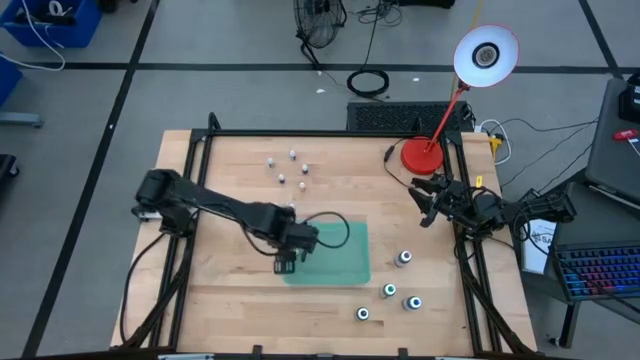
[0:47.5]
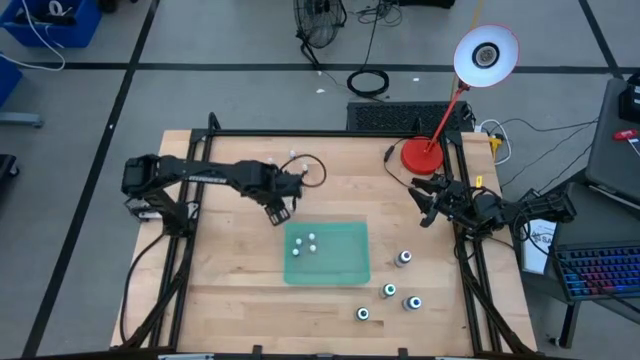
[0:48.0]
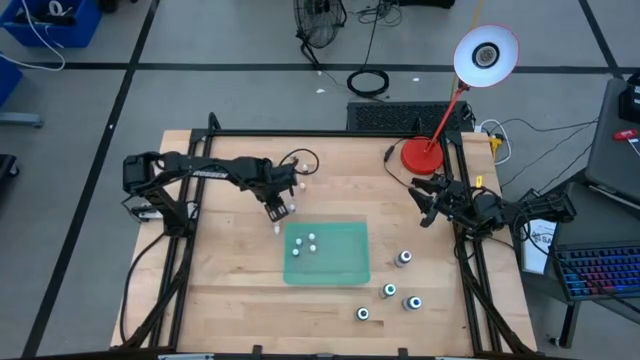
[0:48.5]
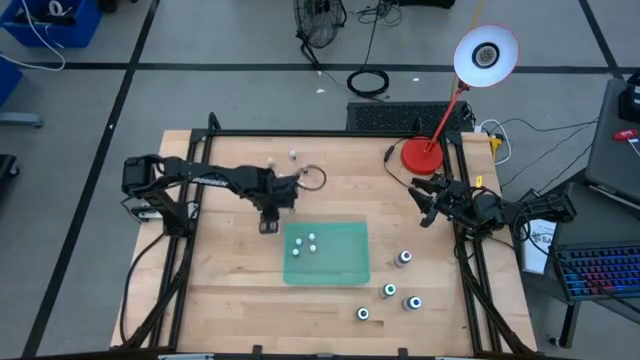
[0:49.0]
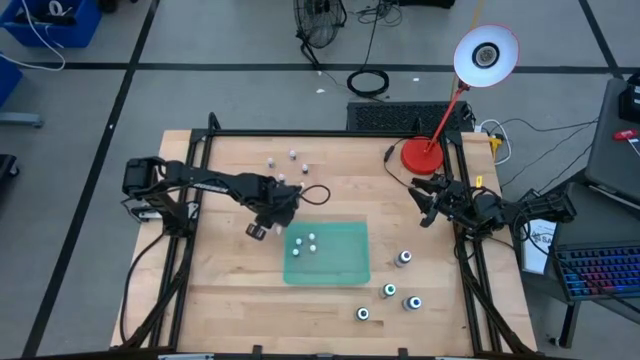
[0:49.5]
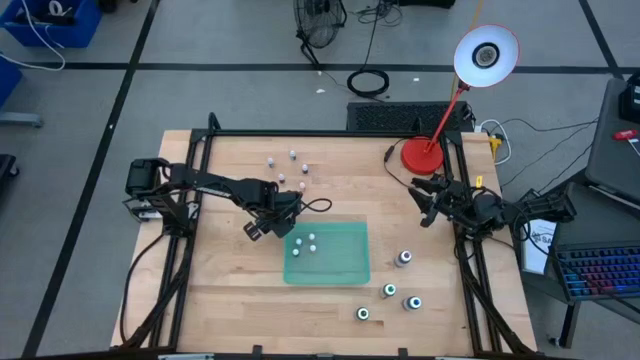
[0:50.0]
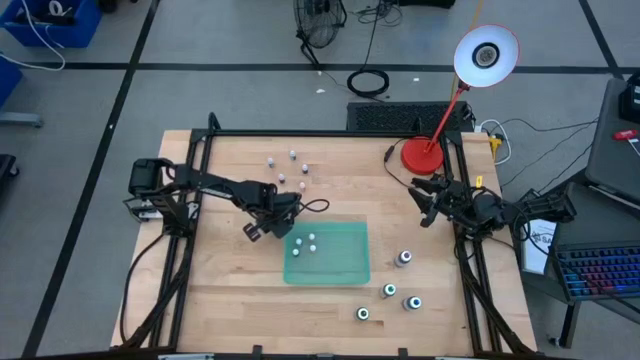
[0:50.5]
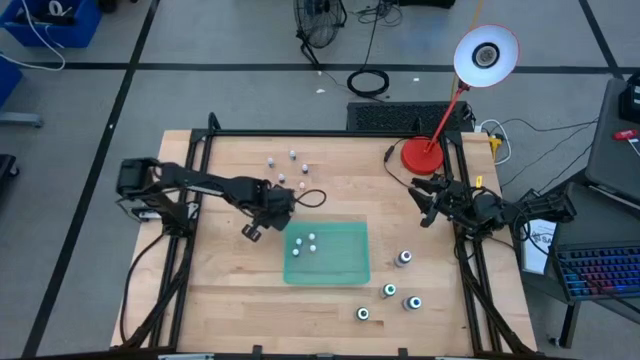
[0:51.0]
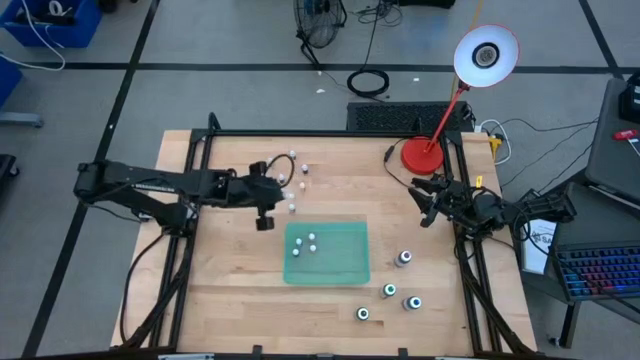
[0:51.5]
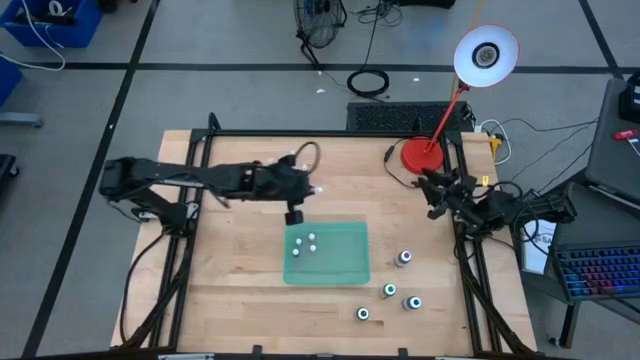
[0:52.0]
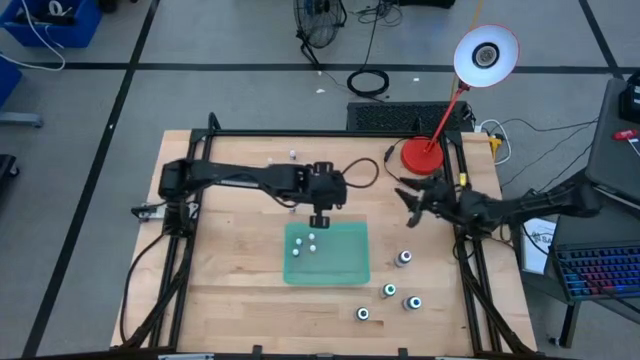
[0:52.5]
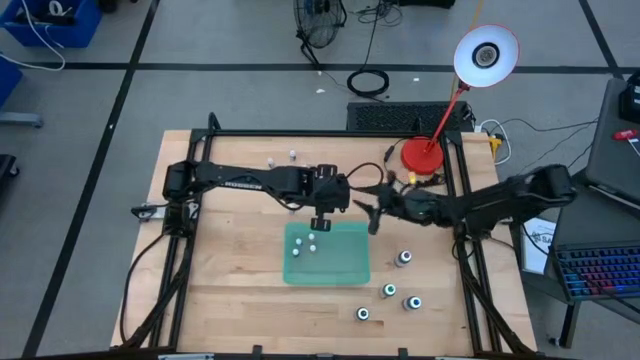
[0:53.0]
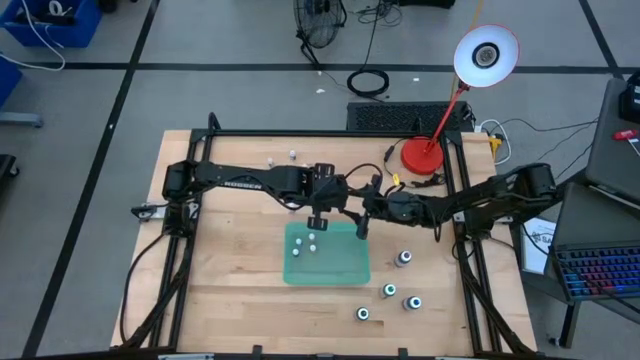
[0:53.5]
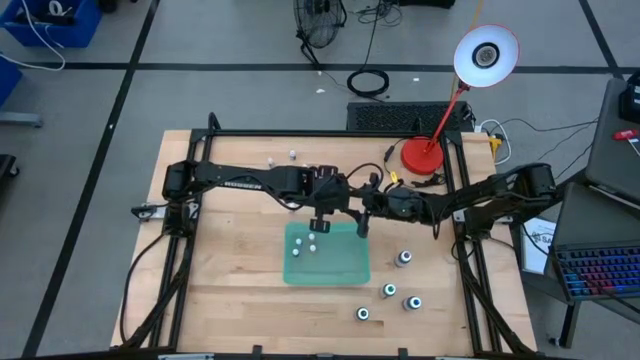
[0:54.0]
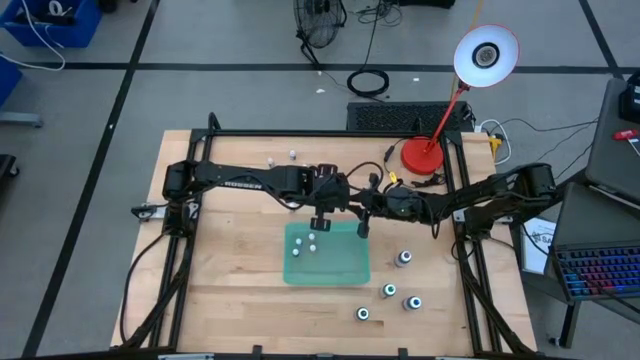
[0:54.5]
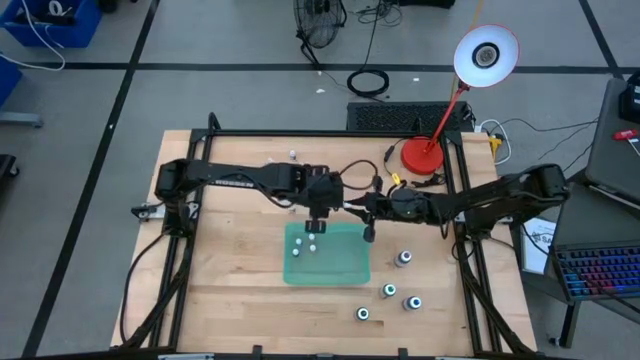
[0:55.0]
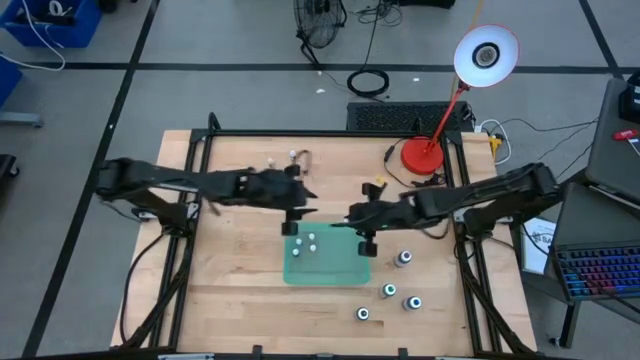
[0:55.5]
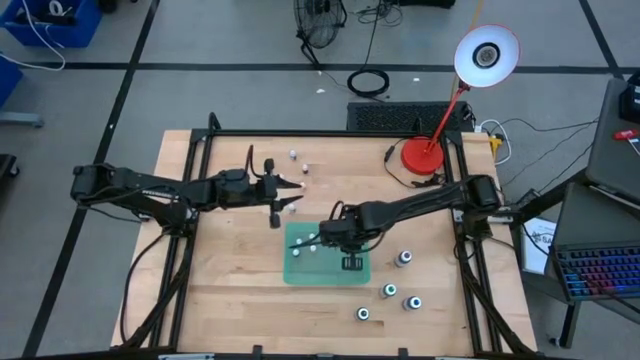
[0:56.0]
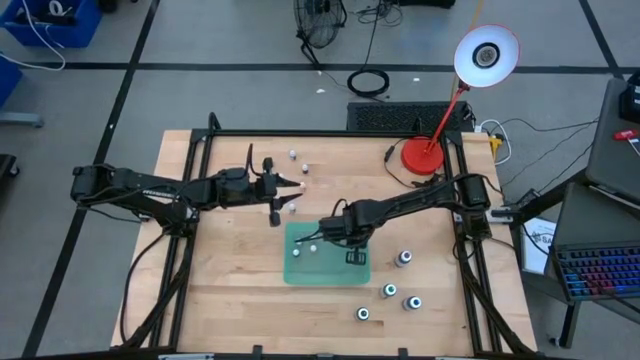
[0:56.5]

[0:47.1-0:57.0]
Task: Pick & Place food coloring
Put the small orange food coloring bottle into the blue bin

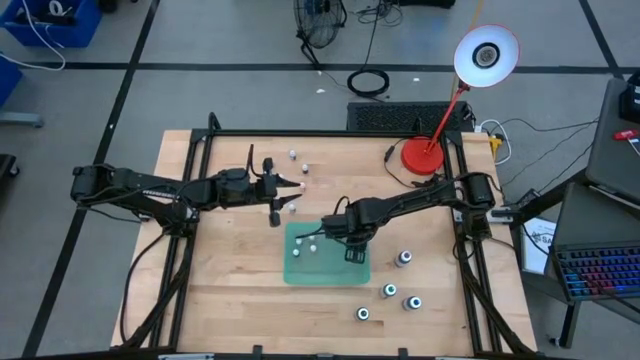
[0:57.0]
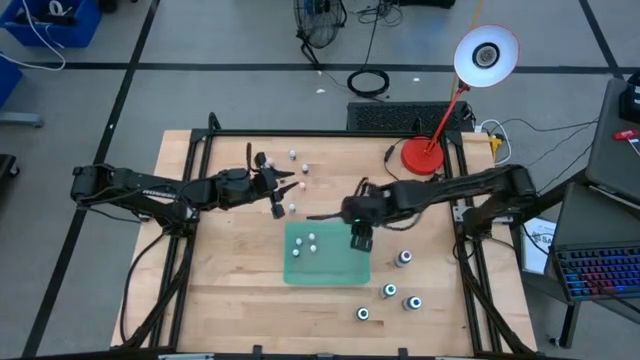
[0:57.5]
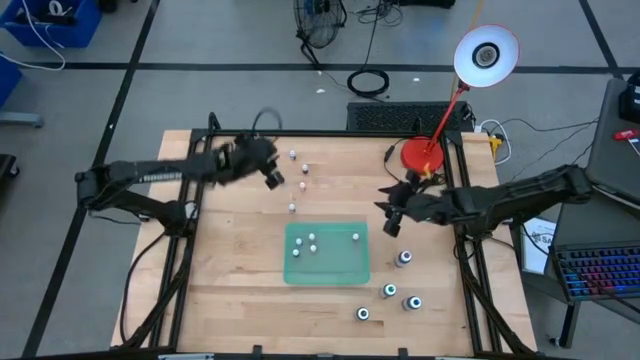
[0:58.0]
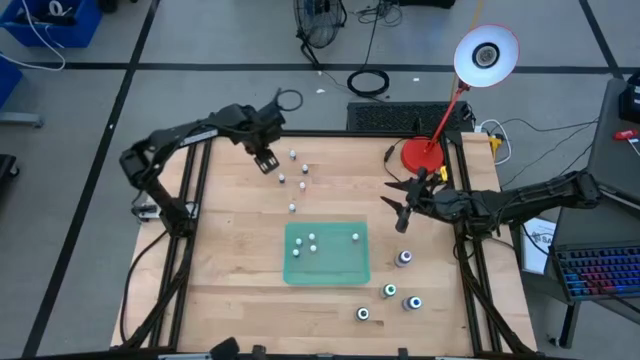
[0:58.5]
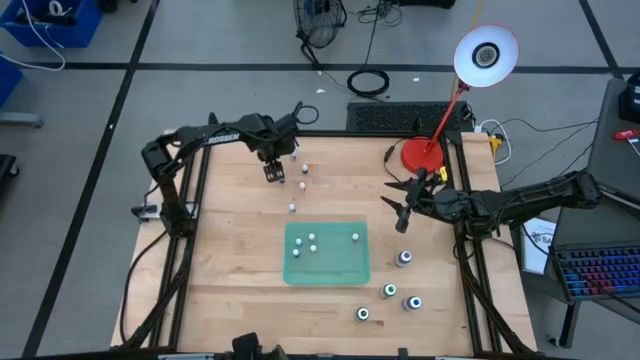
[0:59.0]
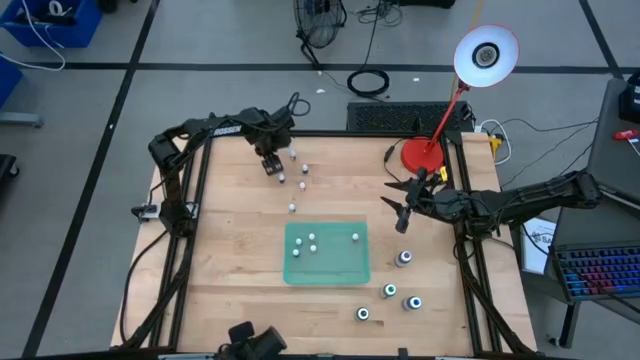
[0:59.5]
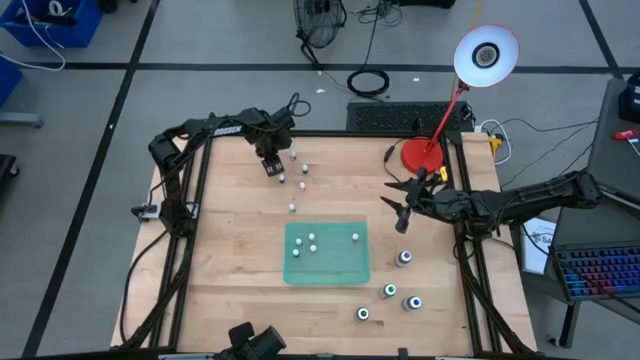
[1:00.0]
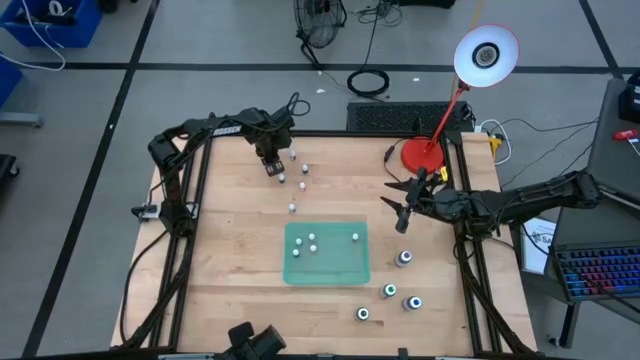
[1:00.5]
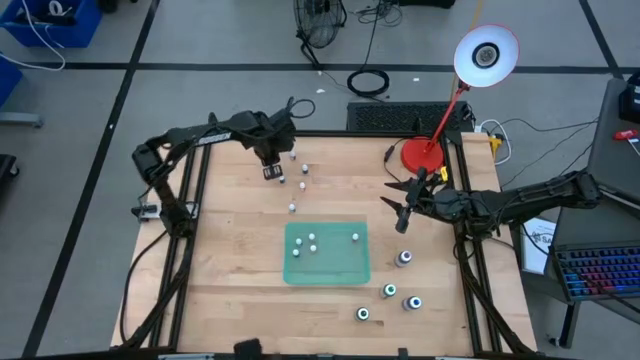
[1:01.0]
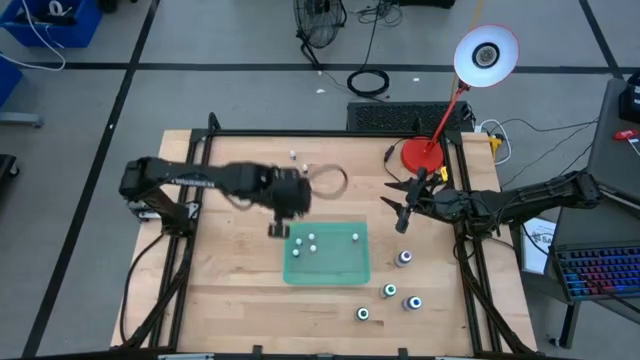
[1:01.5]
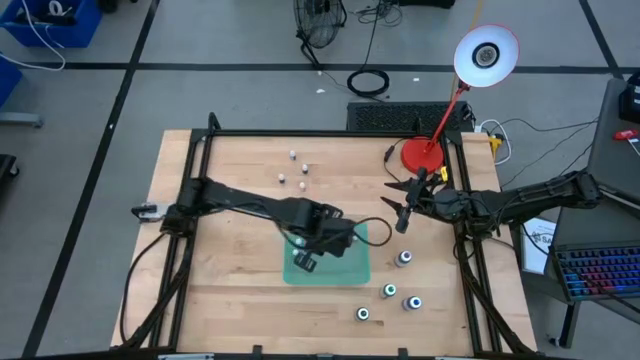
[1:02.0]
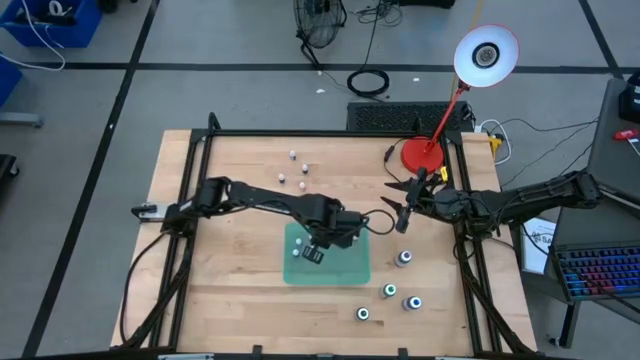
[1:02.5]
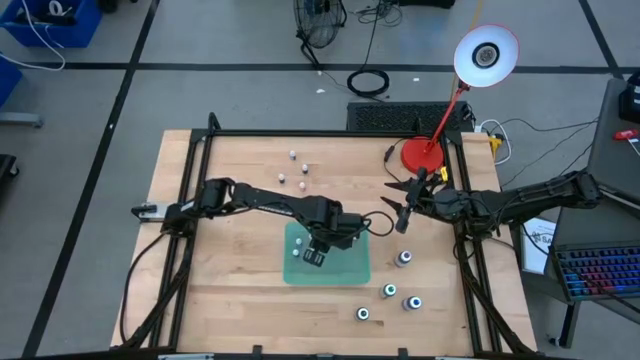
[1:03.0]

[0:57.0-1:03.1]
Put the small green food coloring bottle into the blue bin

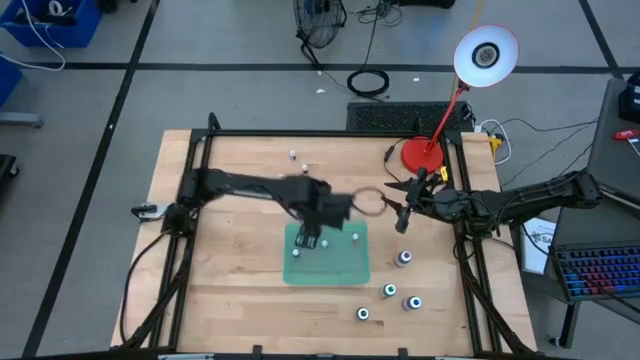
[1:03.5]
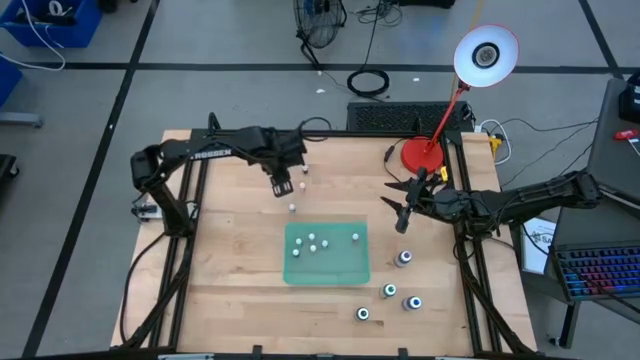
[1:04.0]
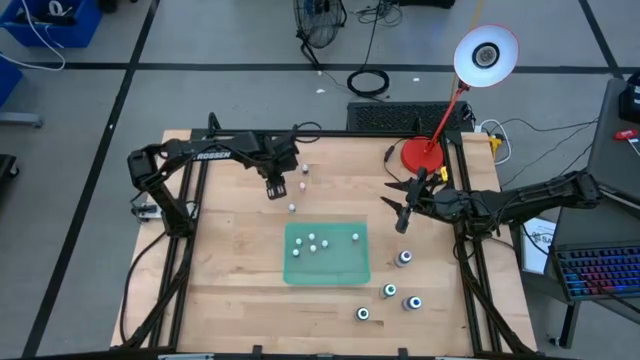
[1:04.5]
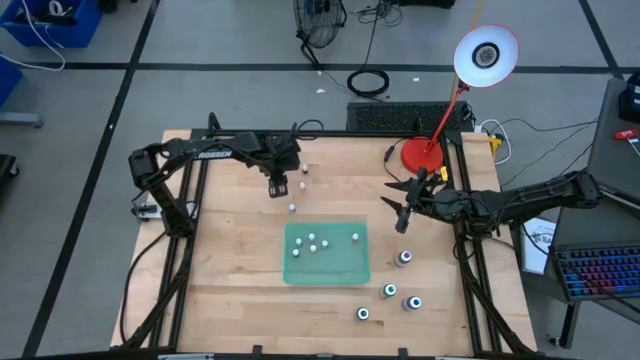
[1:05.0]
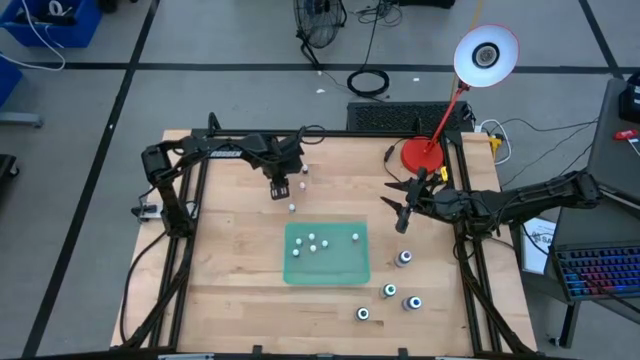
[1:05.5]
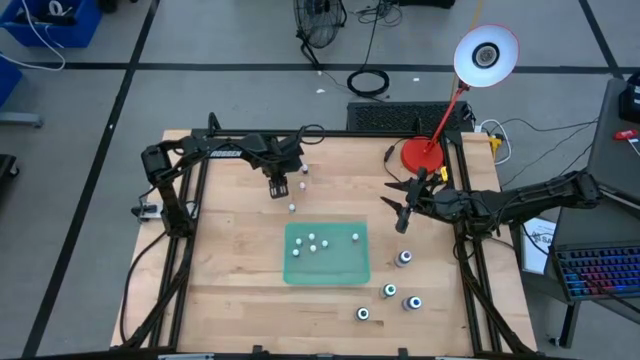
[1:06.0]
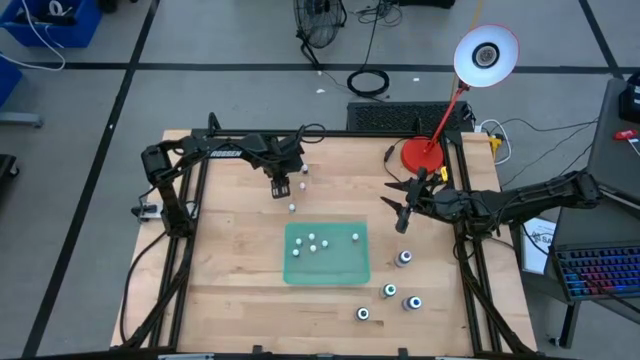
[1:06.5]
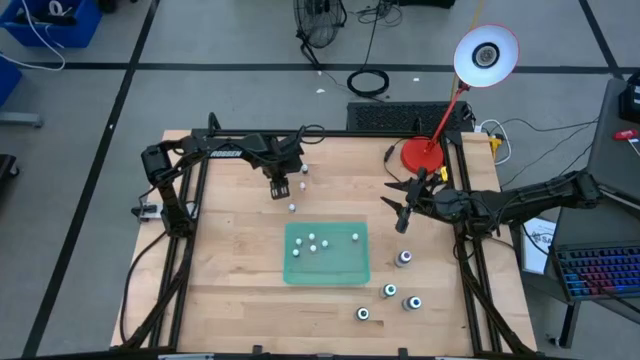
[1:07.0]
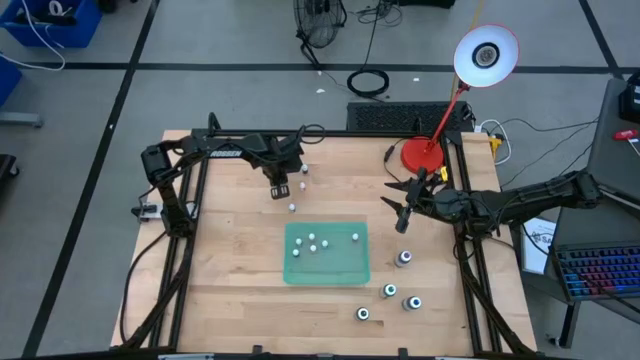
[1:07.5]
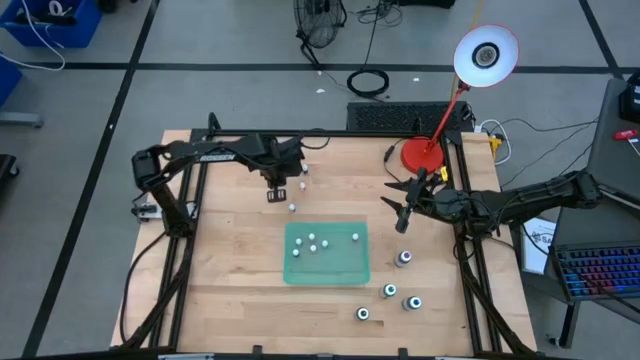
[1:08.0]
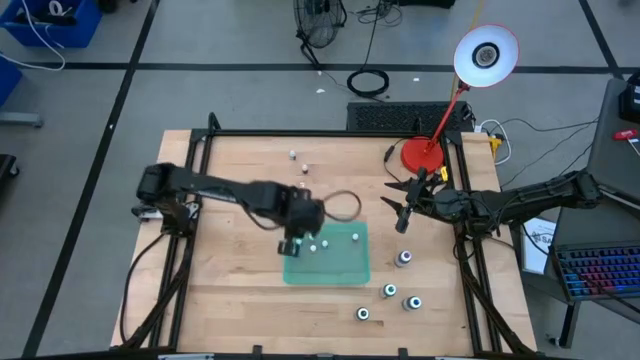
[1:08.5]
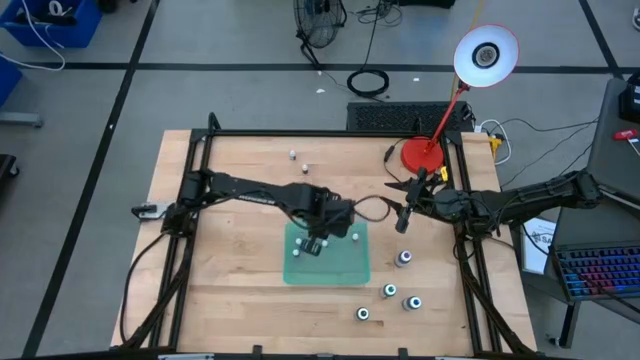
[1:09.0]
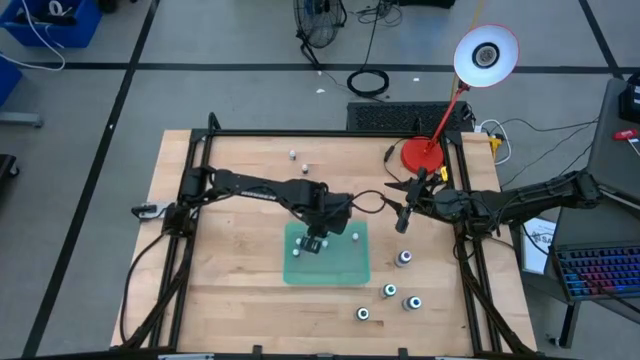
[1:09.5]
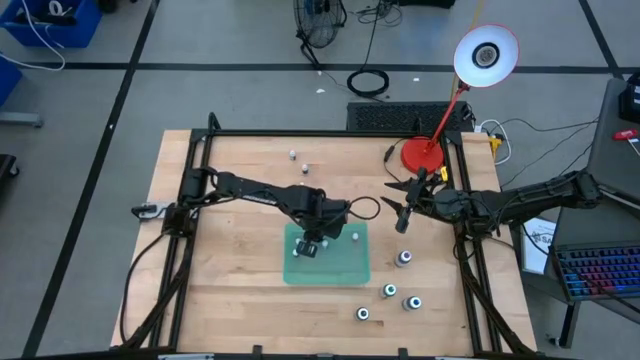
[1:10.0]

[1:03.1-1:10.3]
Put the small purple food coloring bottle into the blue bin
